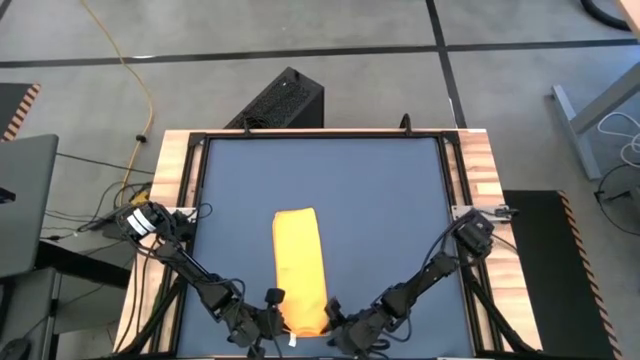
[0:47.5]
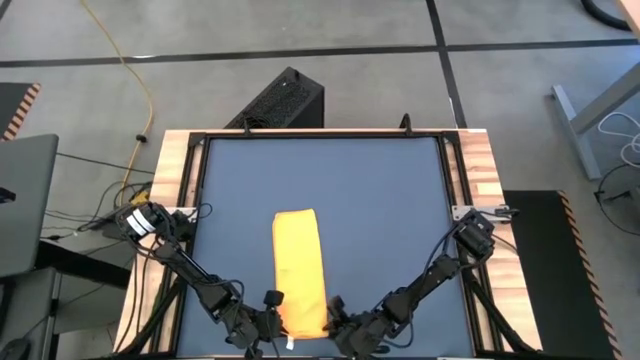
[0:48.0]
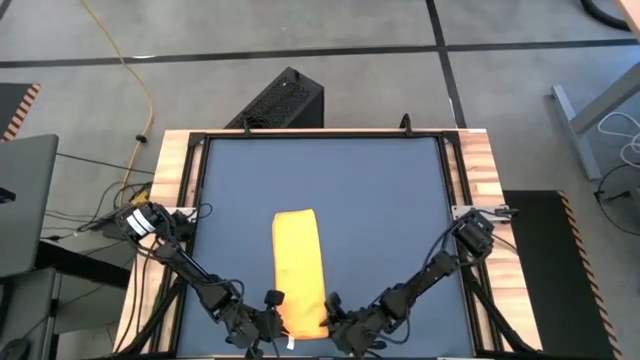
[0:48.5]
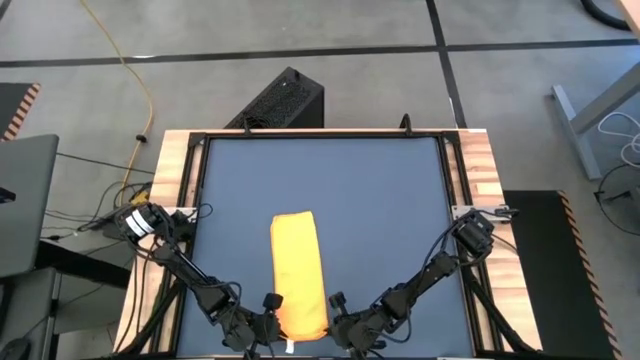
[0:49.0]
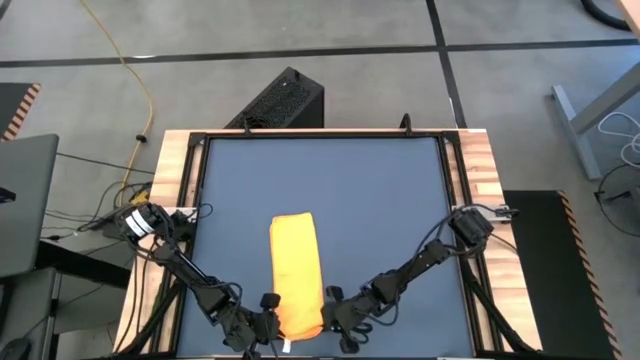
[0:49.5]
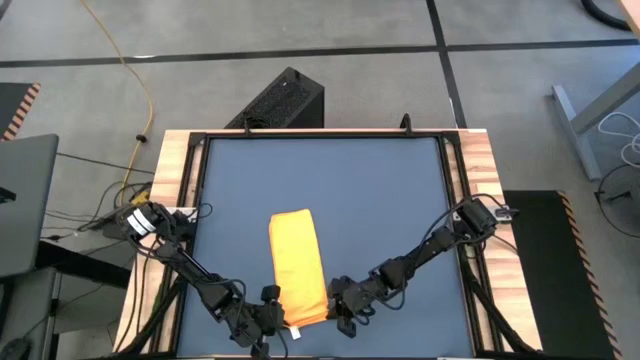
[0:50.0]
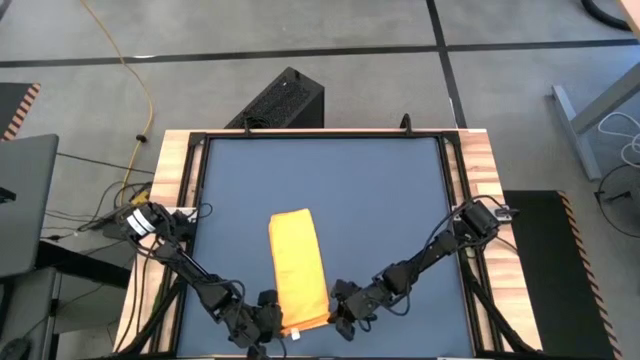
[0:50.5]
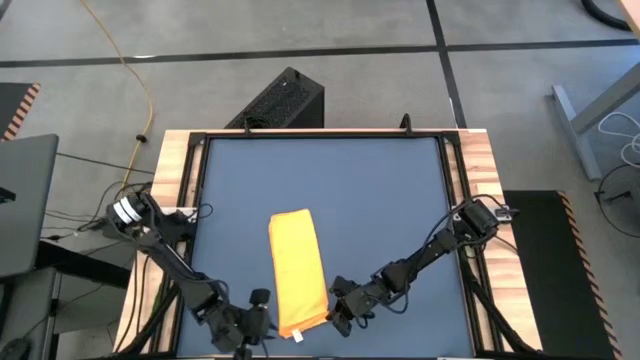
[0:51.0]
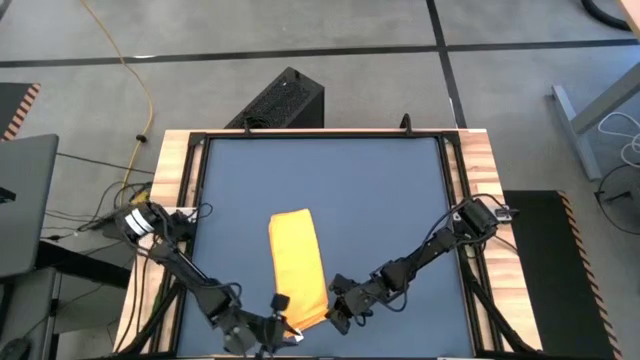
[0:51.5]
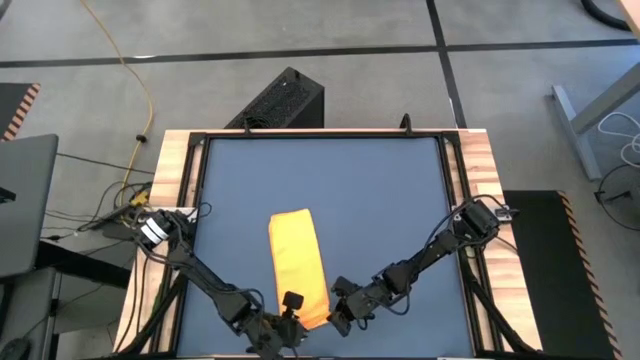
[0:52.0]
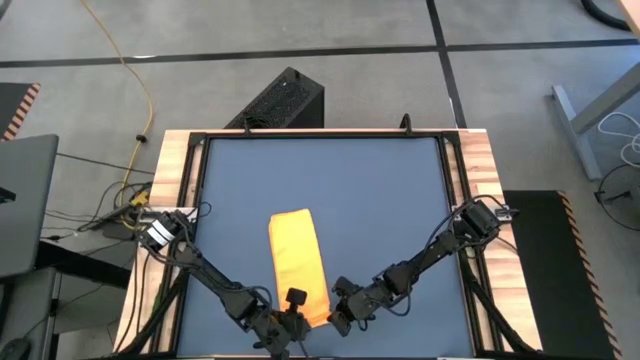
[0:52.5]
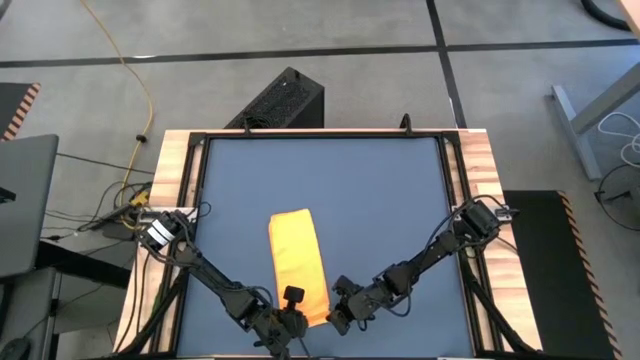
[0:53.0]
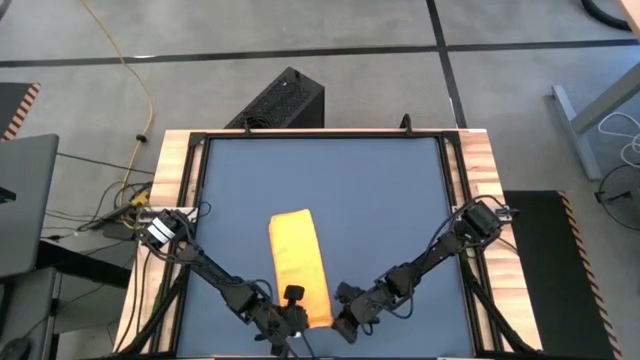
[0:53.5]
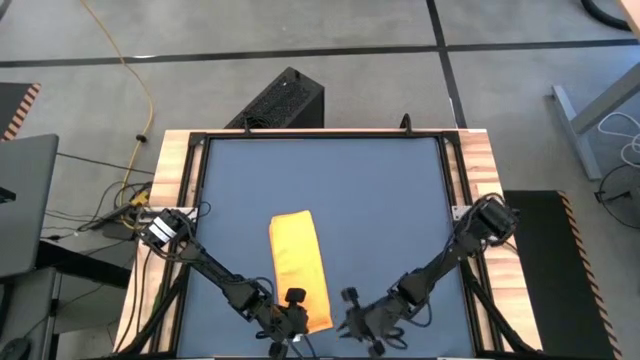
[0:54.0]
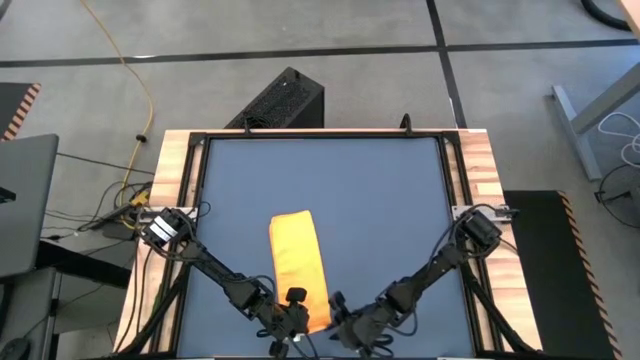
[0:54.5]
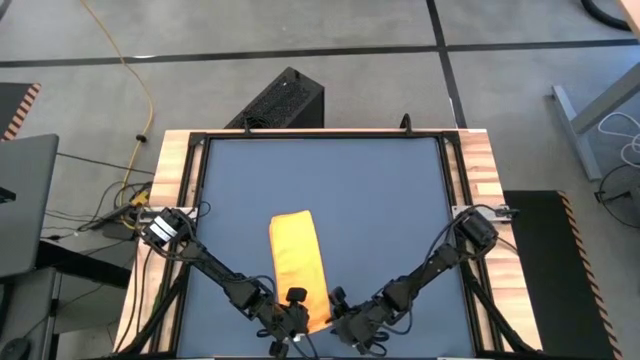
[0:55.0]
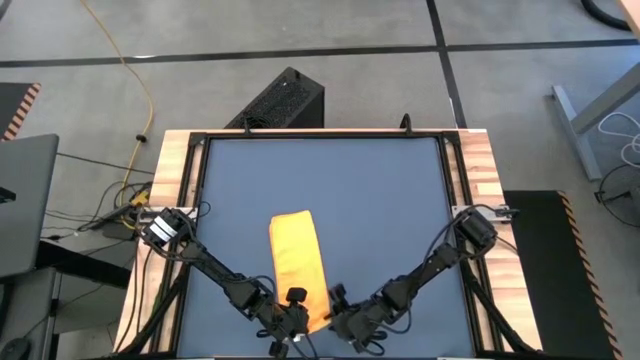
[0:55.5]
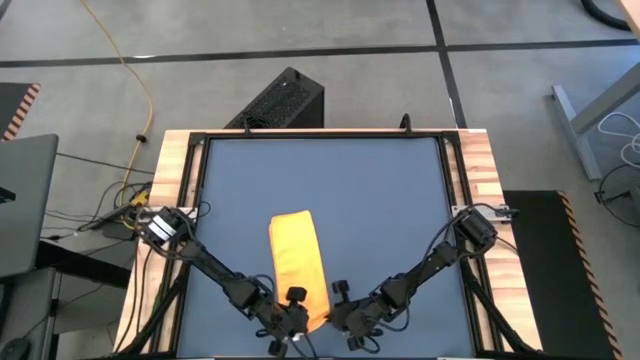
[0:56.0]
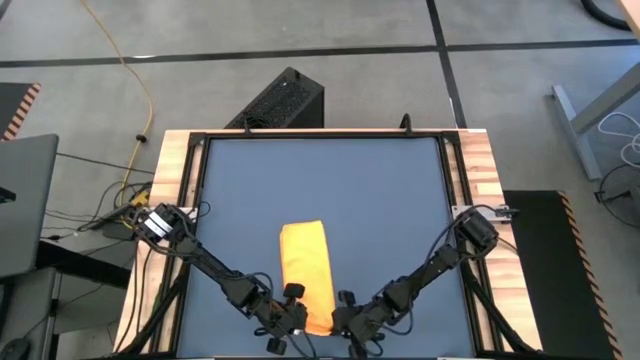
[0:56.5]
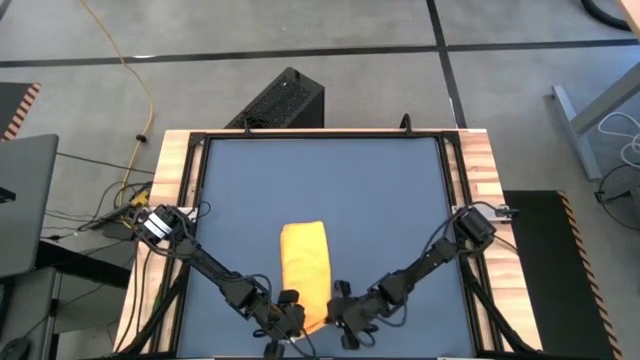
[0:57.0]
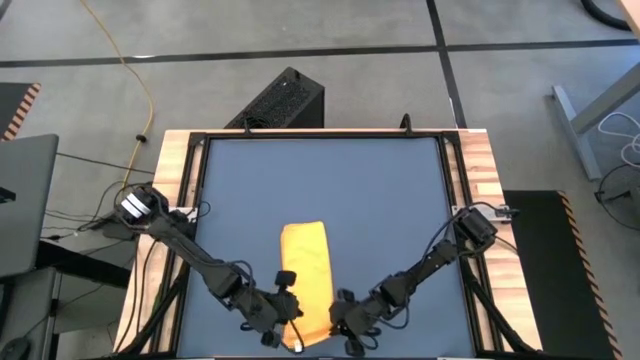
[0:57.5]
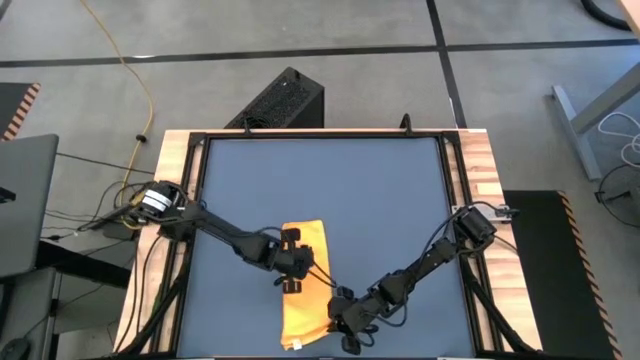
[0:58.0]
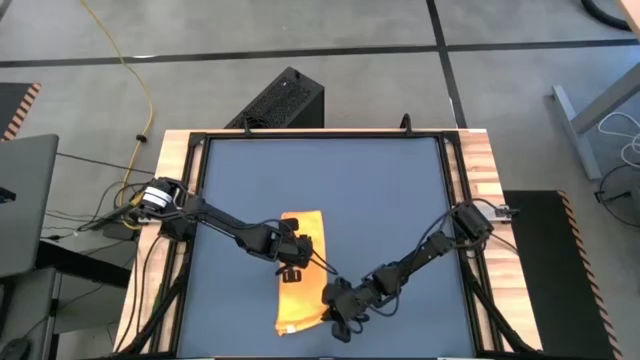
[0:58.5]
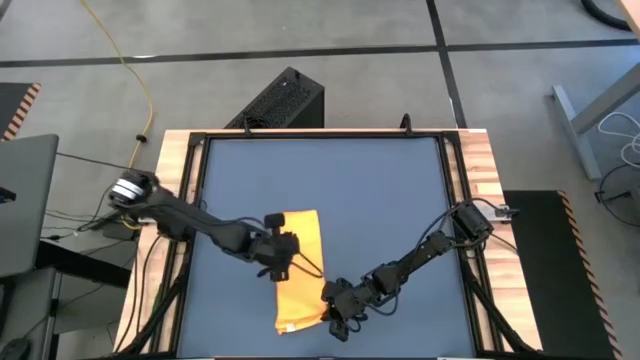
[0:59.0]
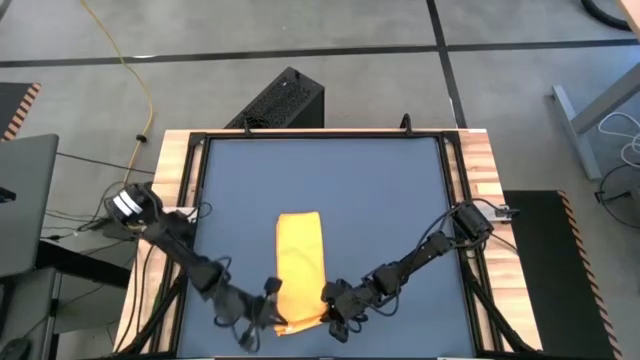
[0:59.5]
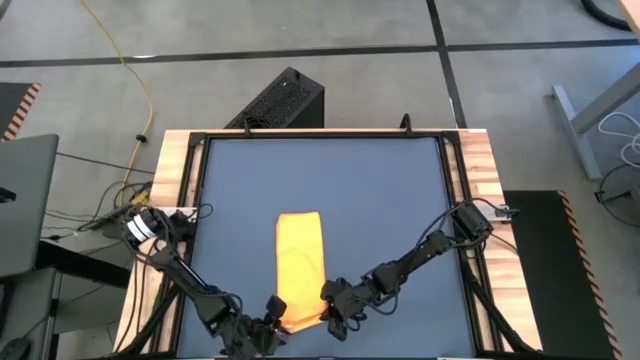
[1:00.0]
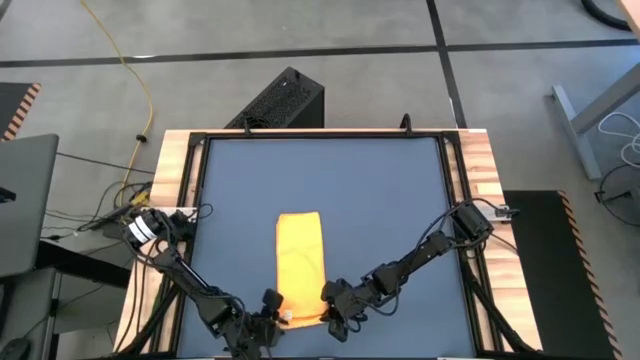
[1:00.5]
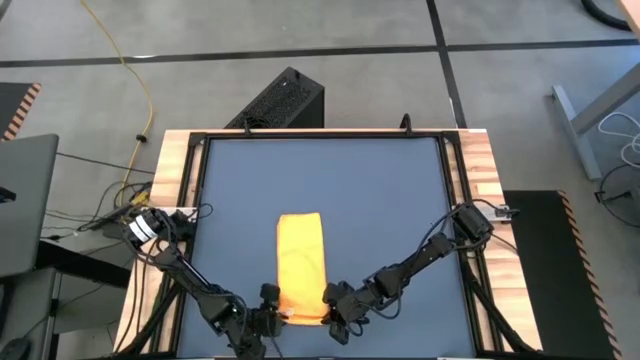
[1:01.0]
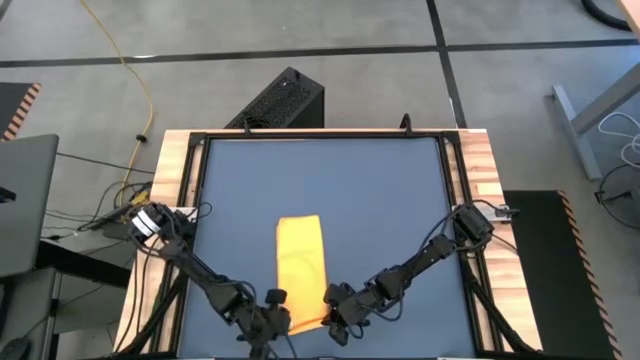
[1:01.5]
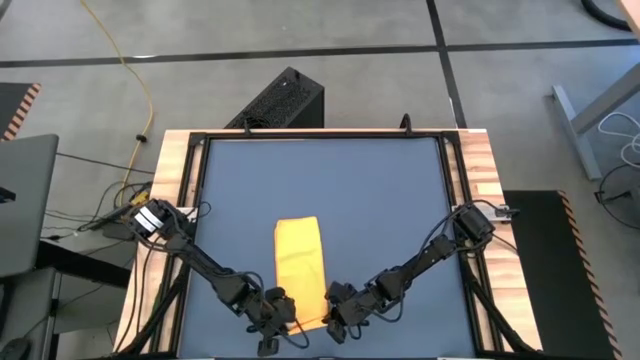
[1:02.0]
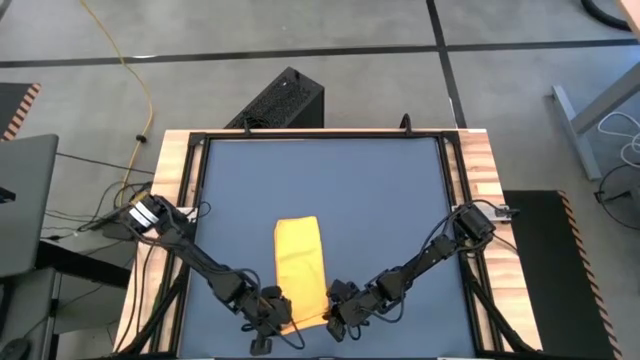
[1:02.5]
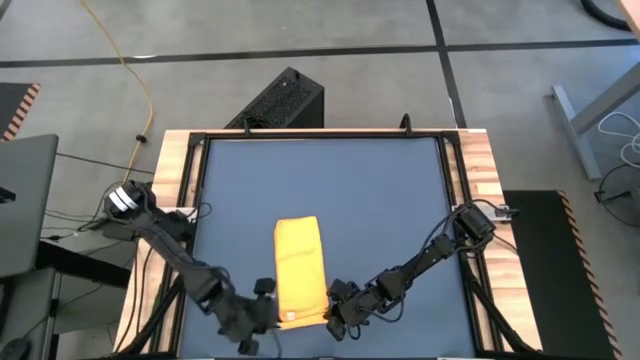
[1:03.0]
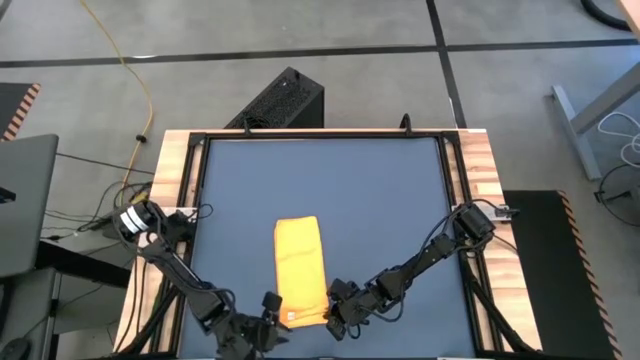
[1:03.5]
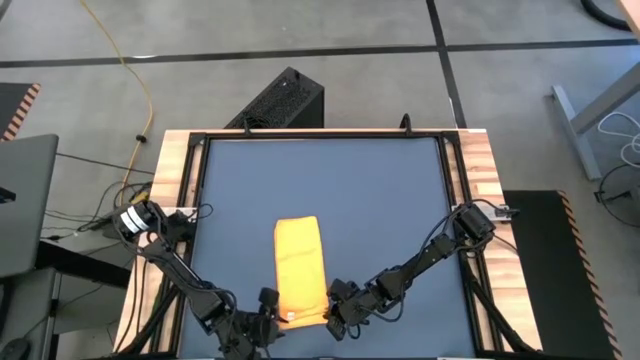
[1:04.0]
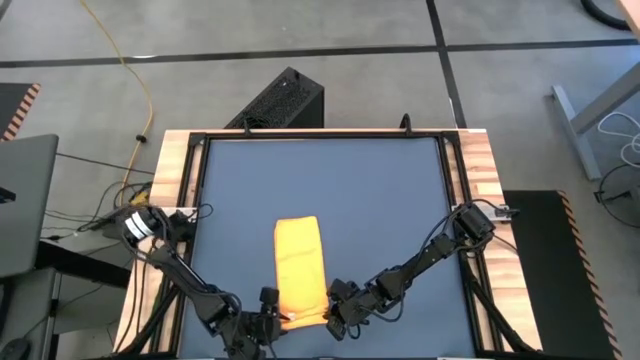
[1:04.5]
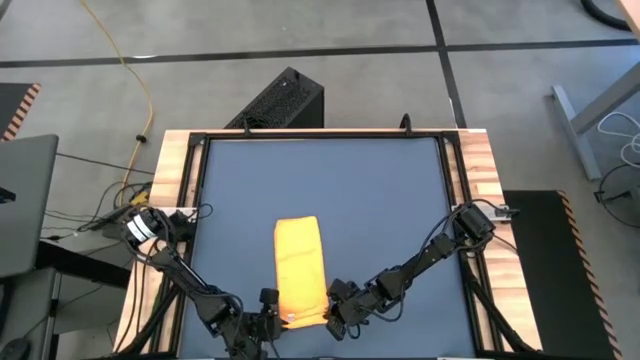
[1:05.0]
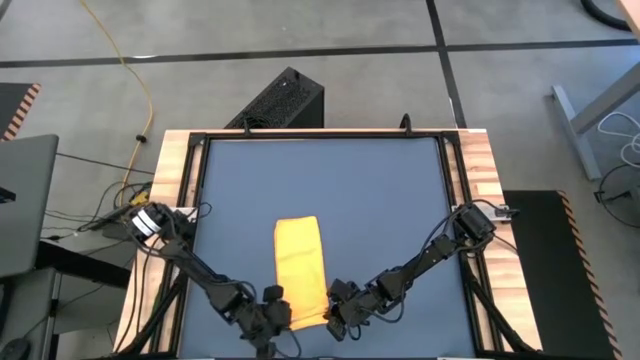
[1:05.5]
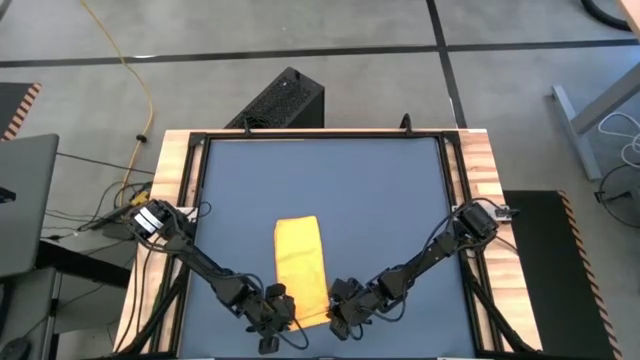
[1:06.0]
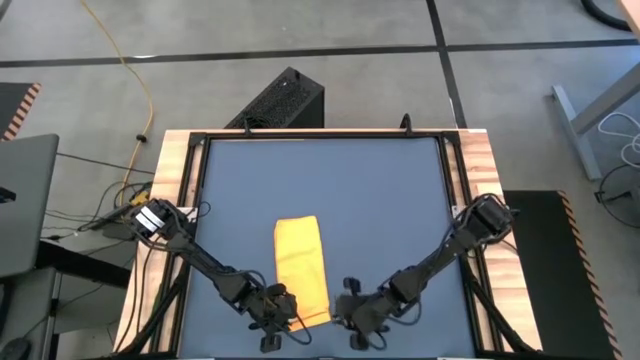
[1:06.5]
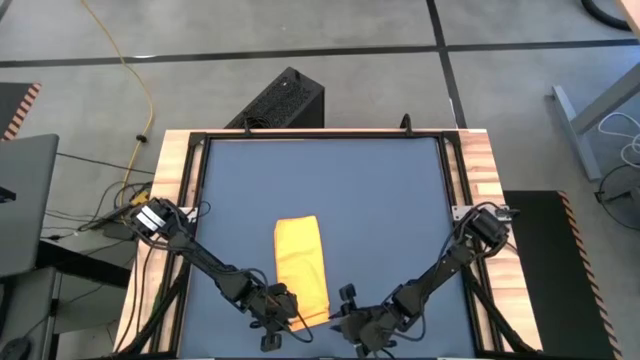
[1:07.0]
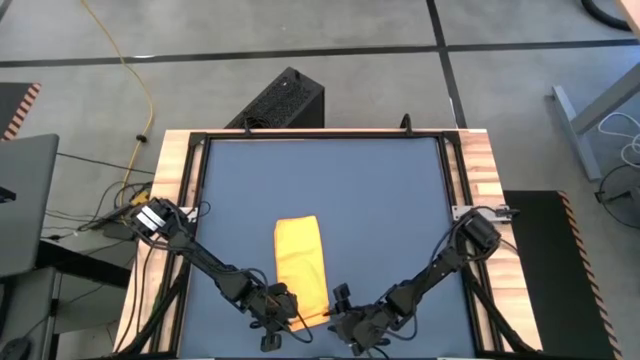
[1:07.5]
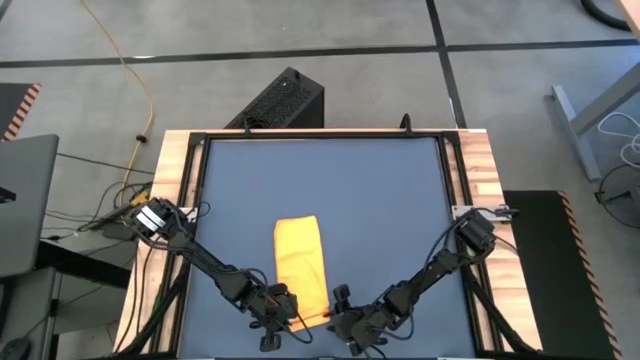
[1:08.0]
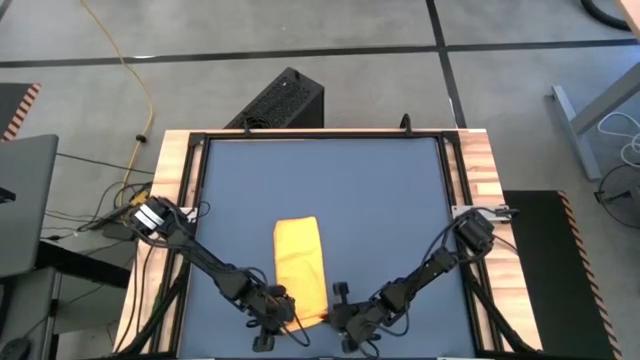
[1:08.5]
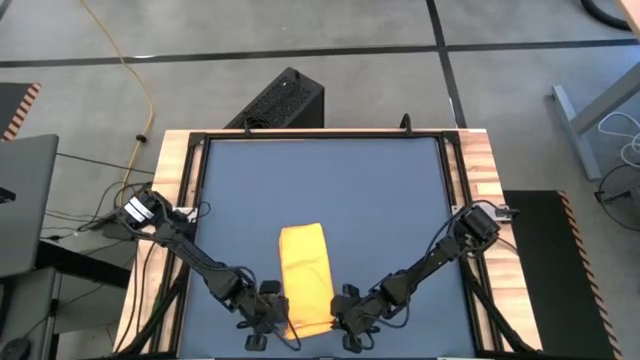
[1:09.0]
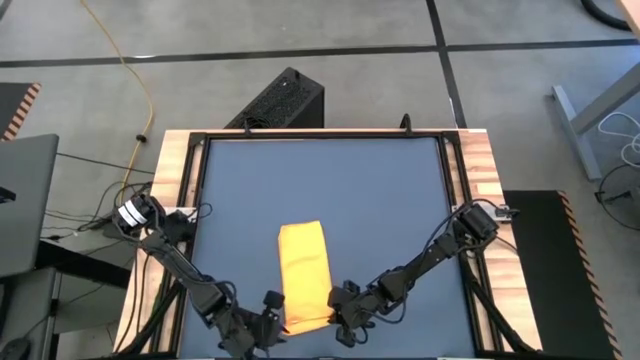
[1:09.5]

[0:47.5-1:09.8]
Task: Roll towel
Roll the orange microfiber towel
